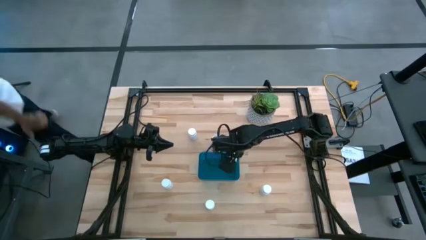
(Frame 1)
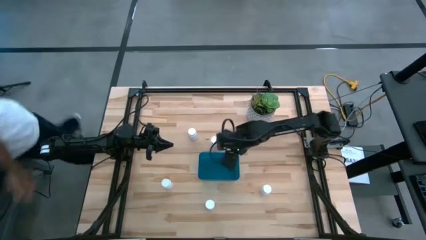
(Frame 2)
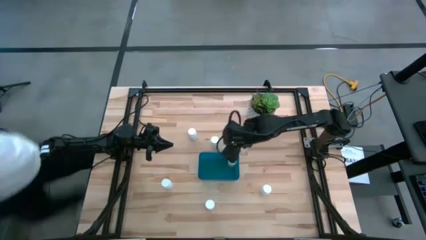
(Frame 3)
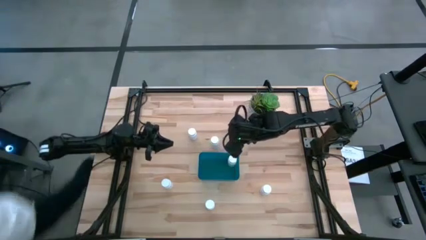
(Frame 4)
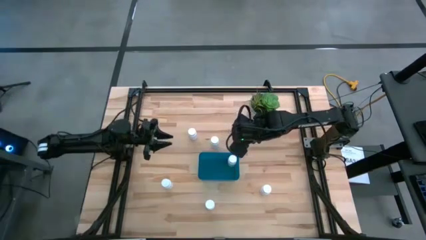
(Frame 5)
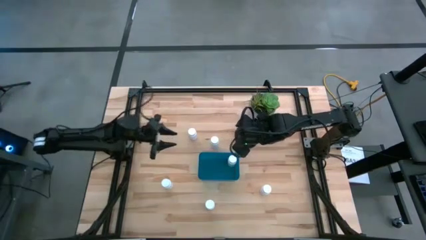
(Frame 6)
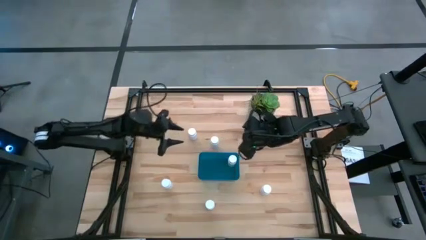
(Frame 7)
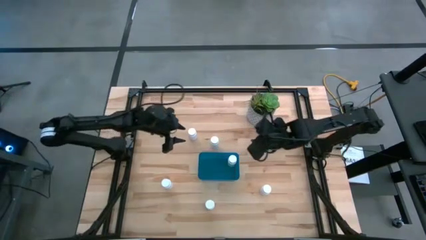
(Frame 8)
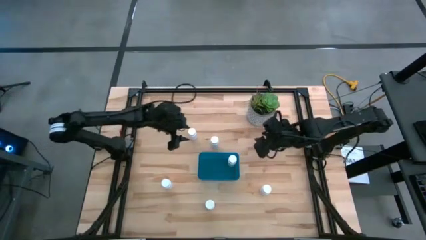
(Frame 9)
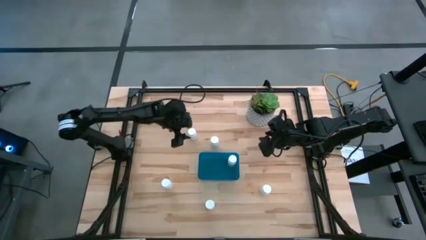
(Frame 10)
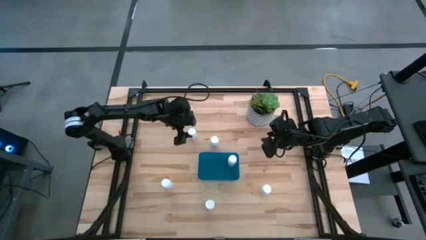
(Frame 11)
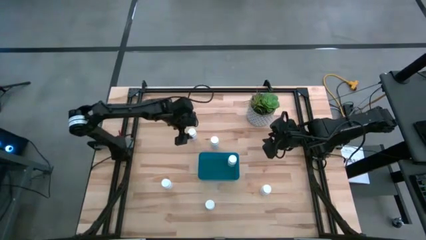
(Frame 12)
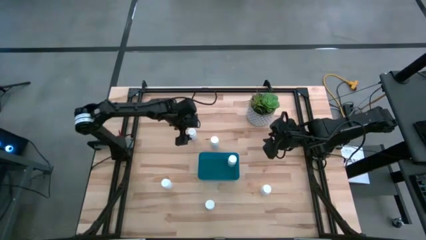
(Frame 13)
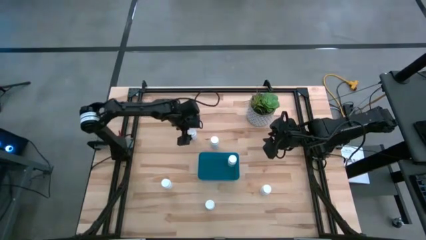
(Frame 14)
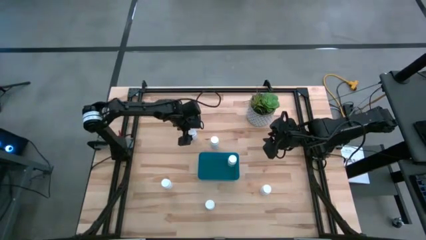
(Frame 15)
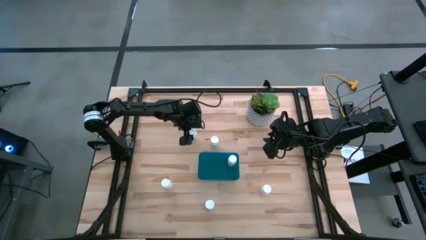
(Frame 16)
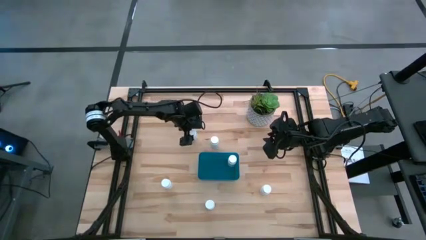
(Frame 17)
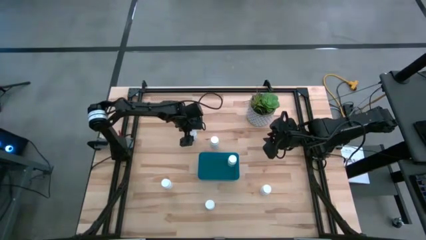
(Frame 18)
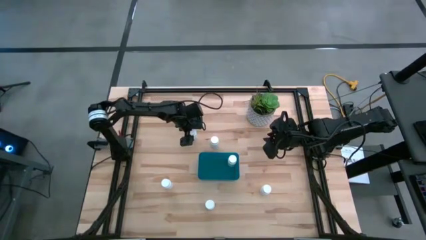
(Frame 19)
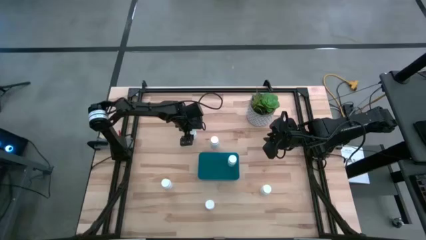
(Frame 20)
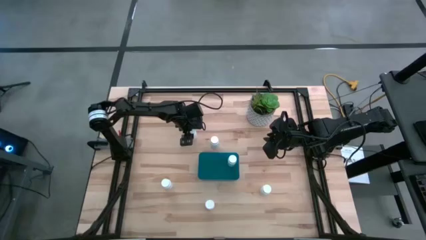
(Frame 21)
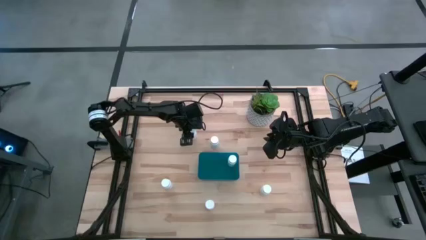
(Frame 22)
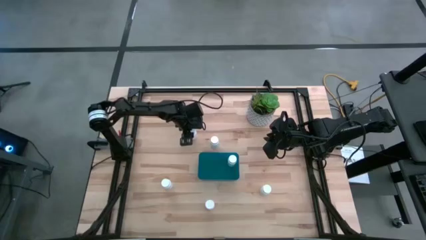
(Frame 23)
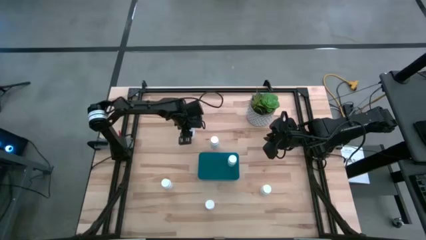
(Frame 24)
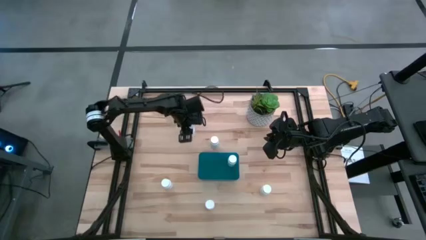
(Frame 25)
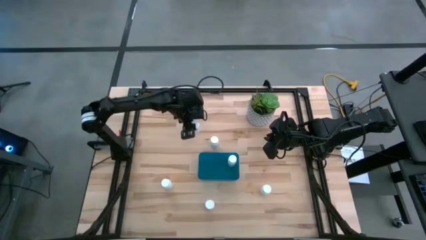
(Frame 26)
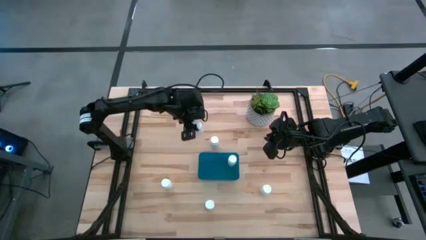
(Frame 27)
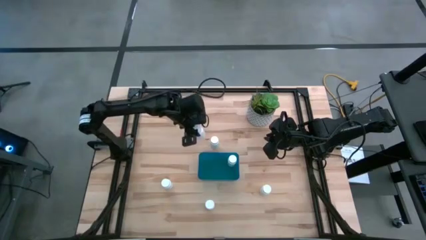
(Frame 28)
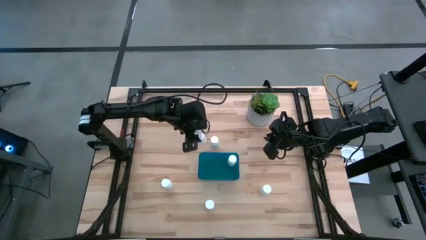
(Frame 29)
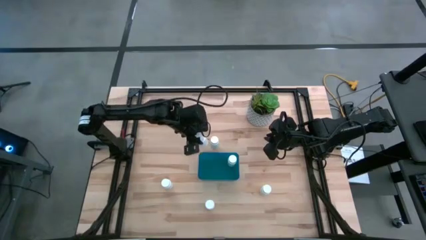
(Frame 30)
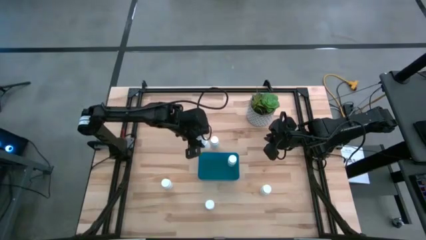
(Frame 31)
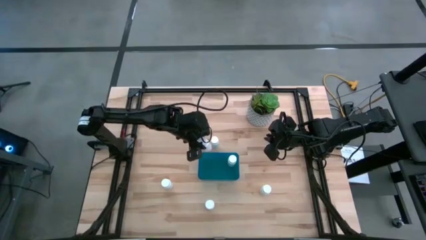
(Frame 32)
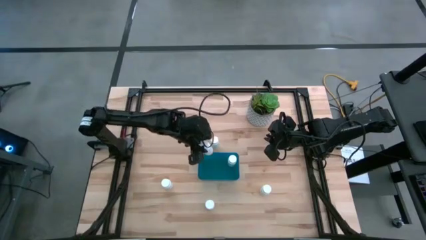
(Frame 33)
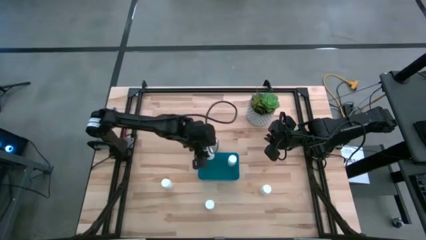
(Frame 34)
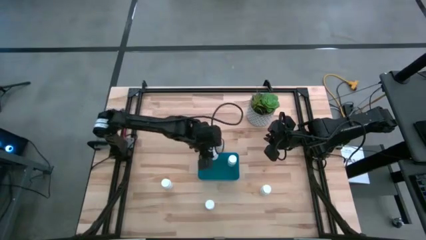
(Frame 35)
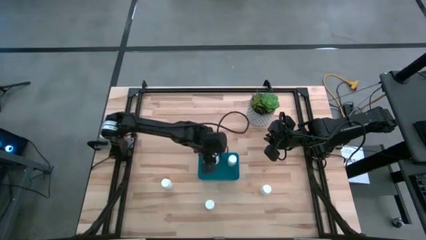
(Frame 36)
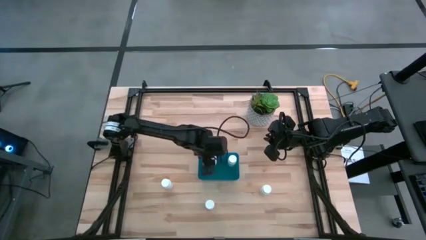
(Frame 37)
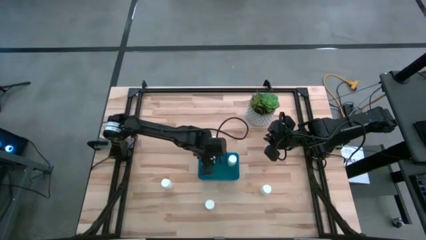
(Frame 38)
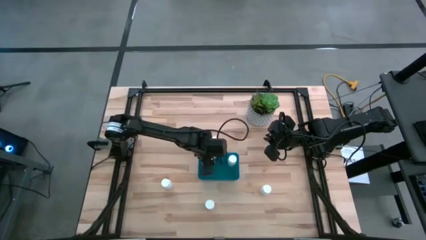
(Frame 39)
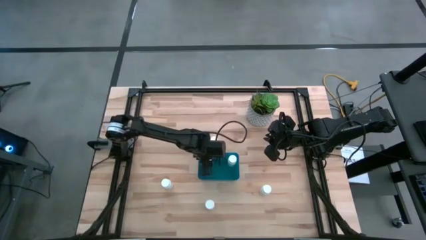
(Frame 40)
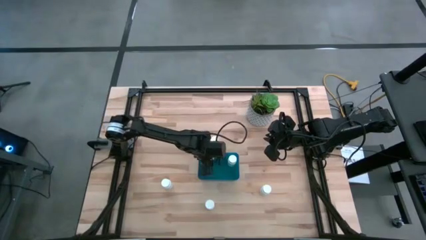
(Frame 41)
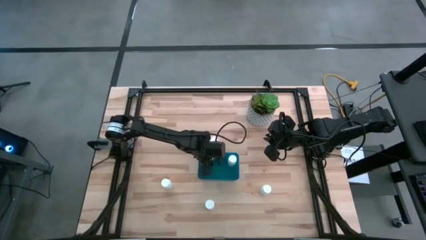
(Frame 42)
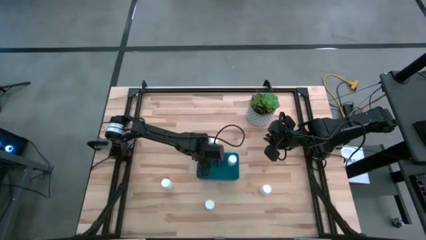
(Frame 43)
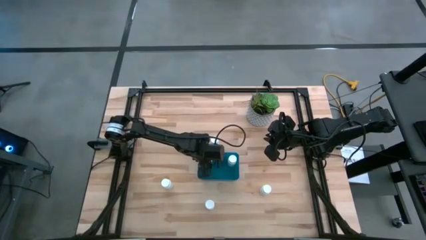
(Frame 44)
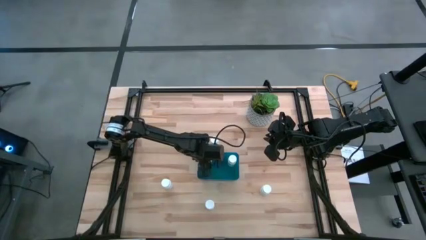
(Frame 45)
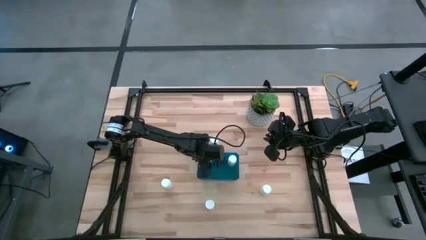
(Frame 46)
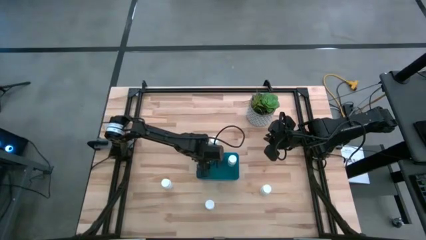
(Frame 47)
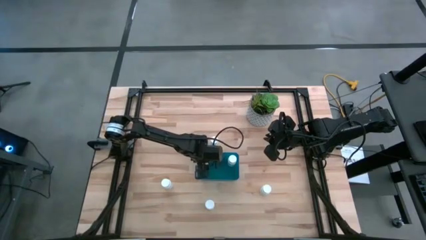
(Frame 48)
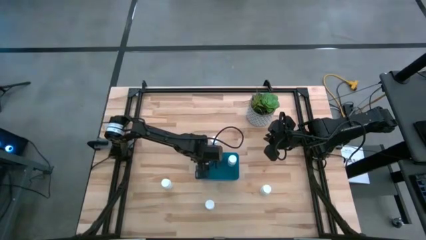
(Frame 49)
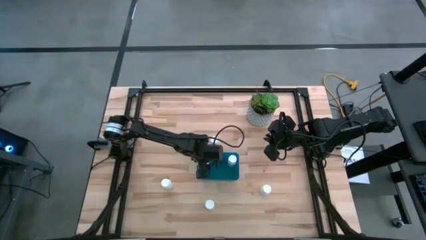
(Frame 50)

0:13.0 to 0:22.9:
Task: Pick and place pill bottles into a basket
Put the white pill bottle into the blue bin
